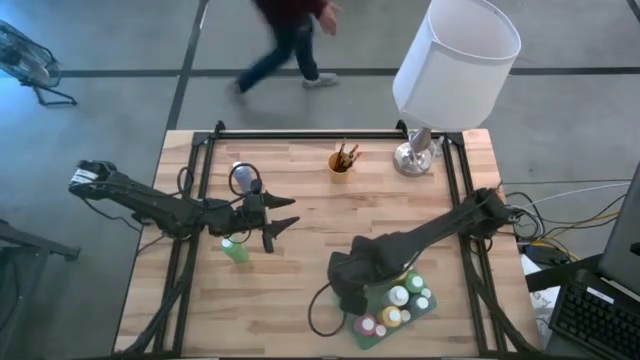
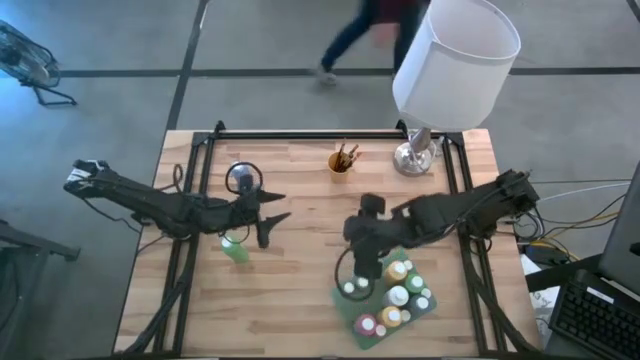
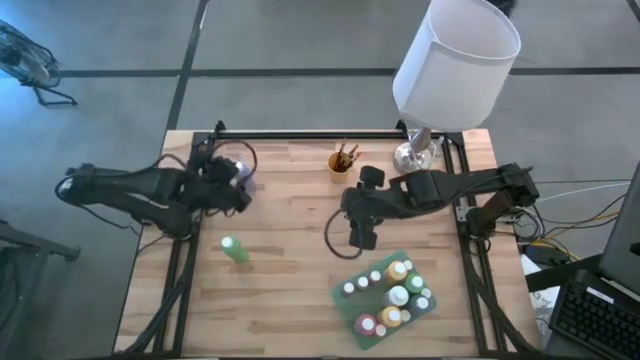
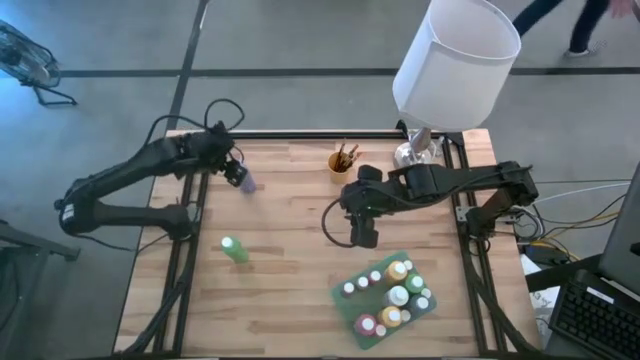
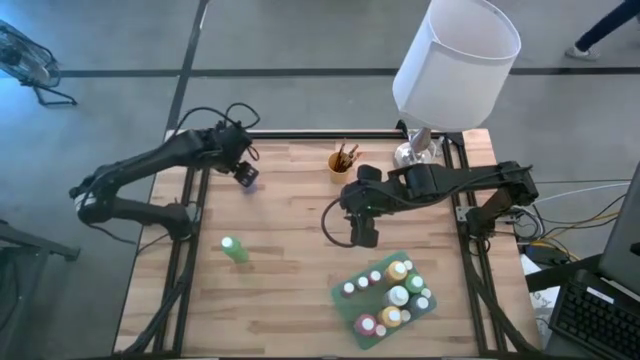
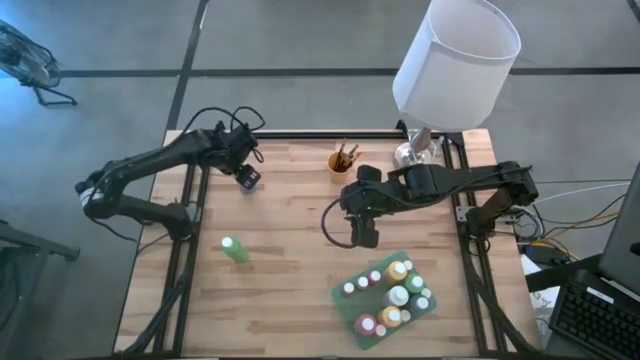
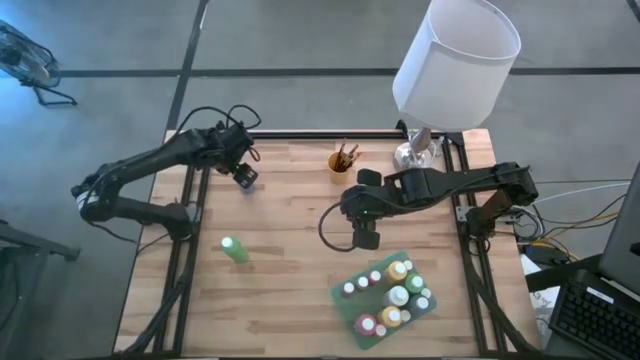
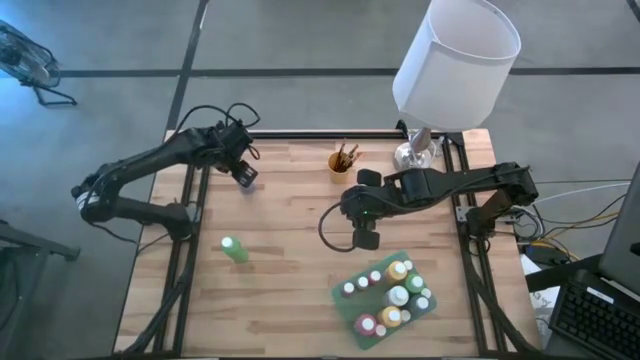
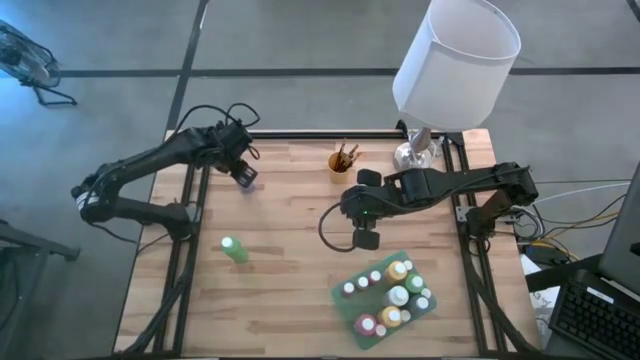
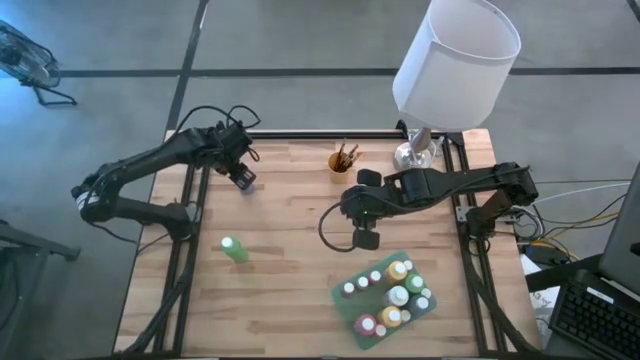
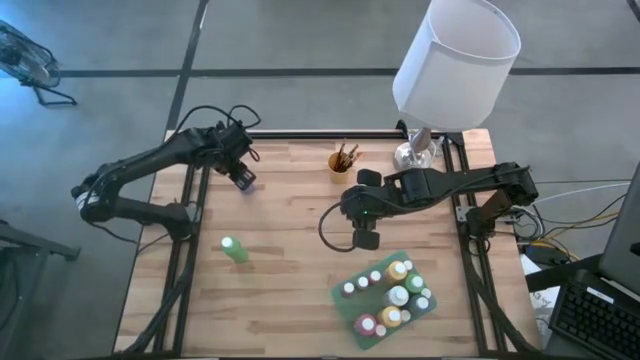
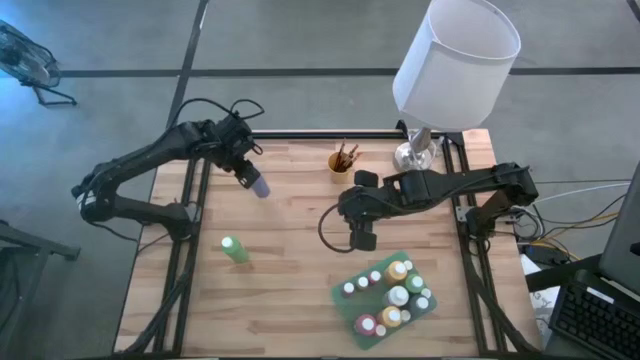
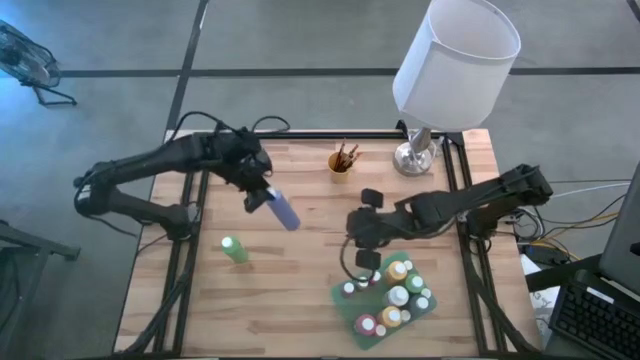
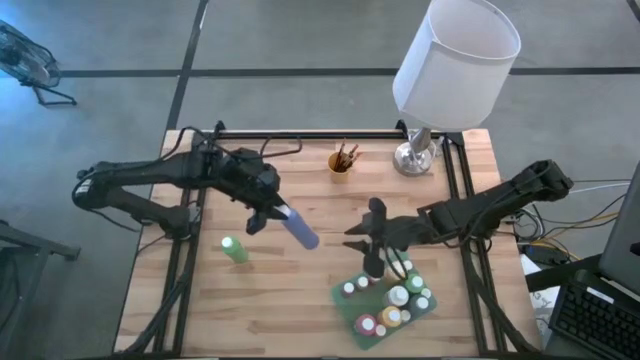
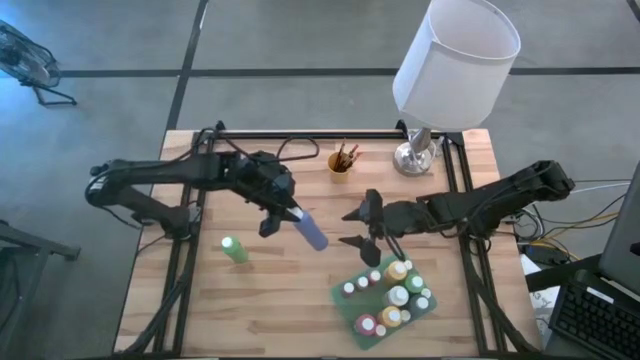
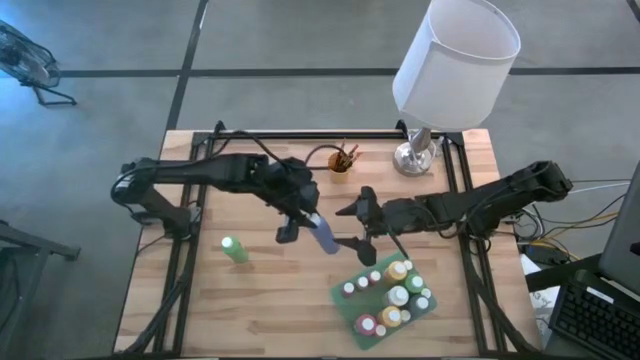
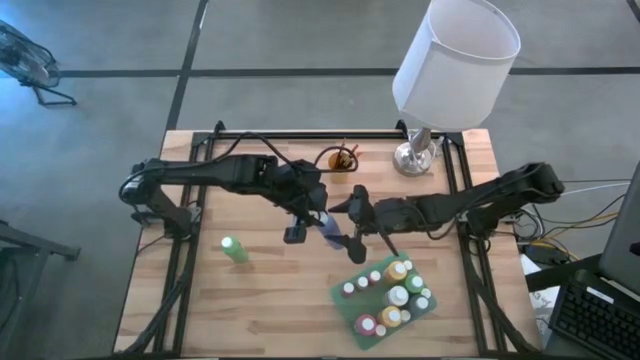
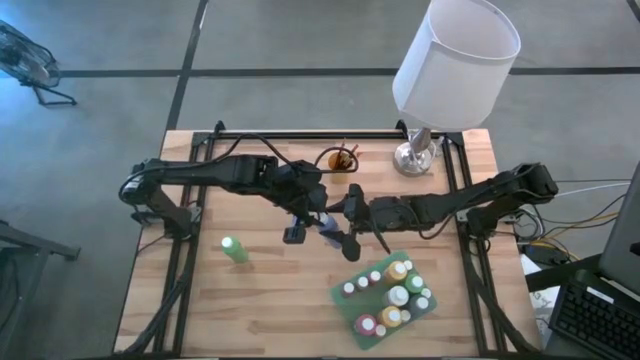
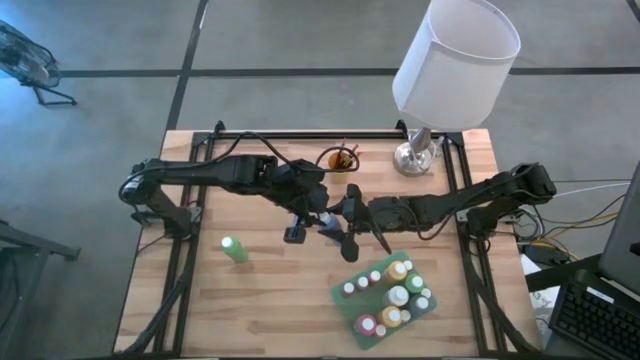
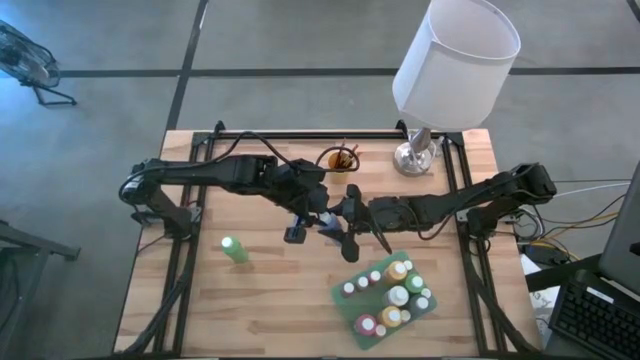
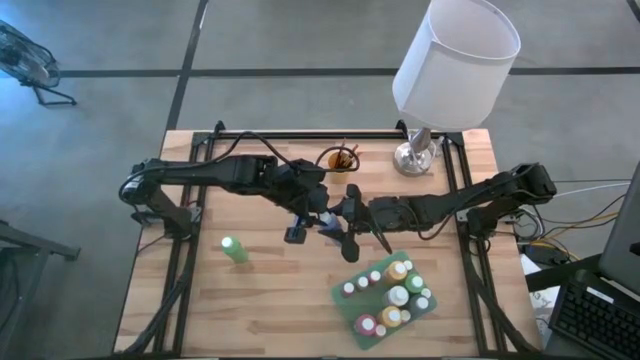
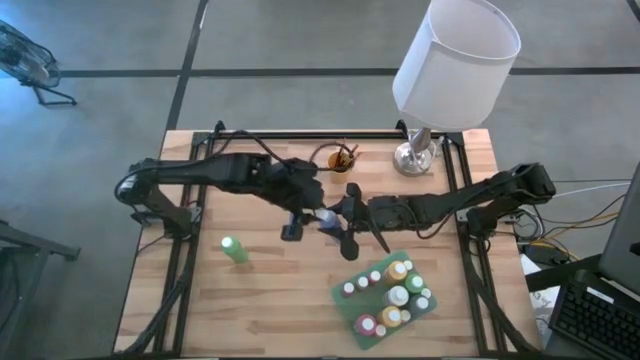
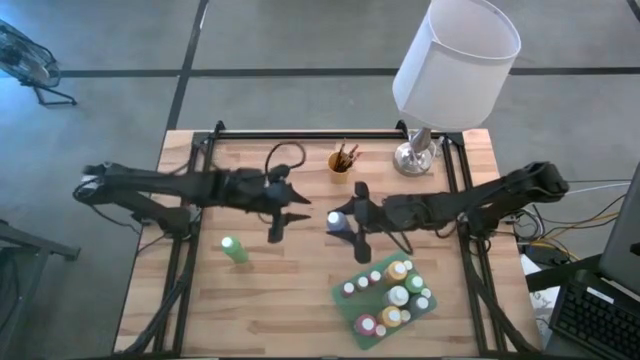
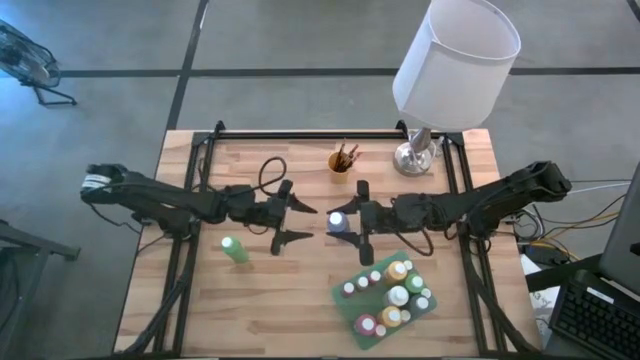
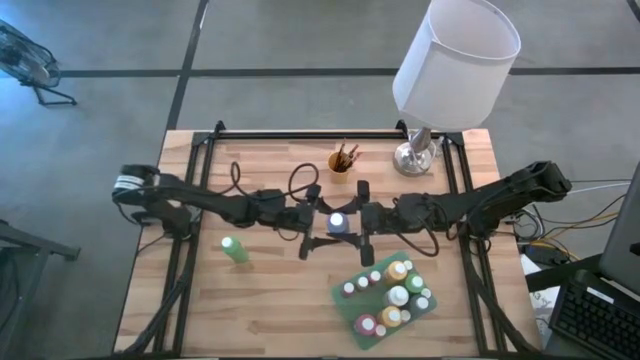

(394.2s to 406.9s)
Task: Pick & Place Paint Supplies
Put the purple paint bottle into the green bin

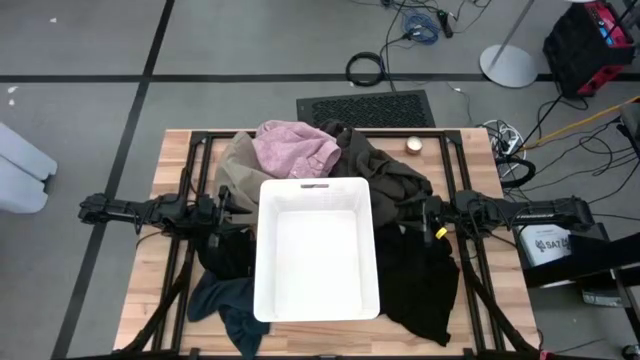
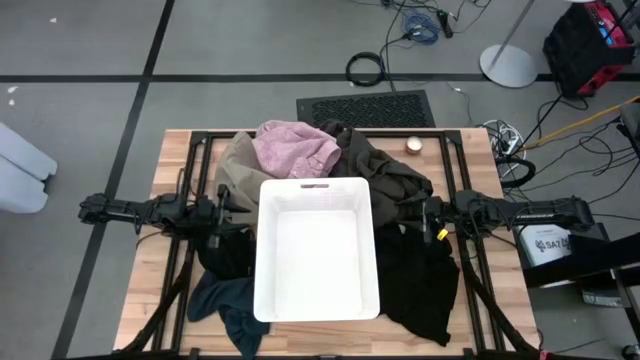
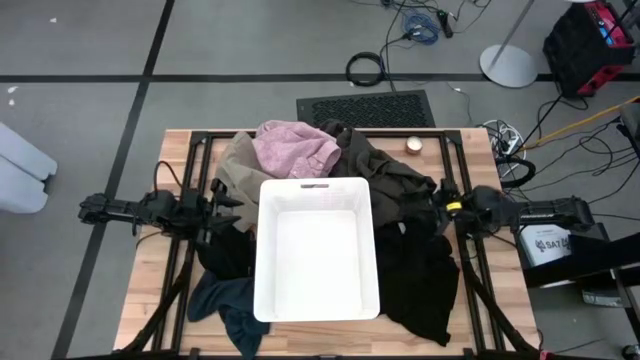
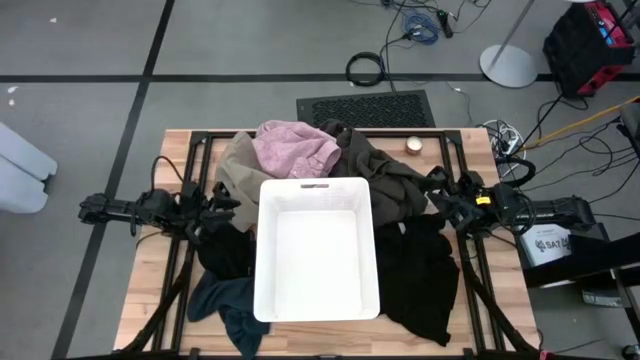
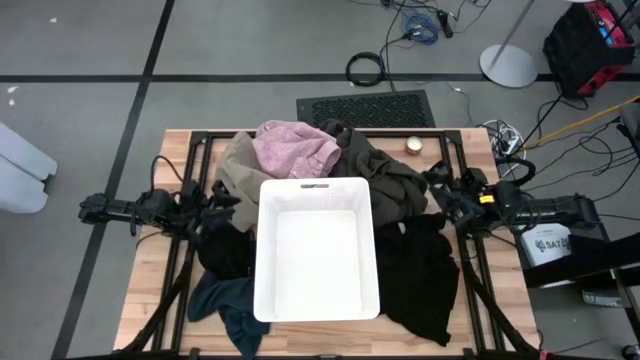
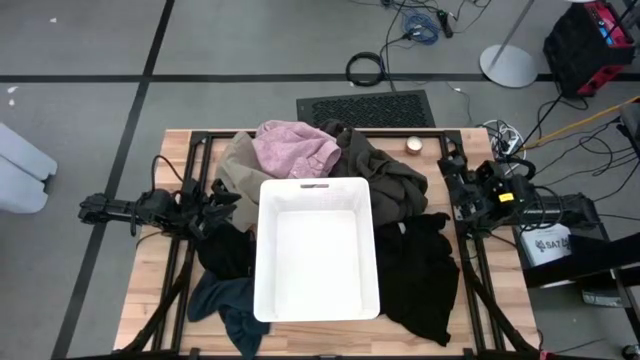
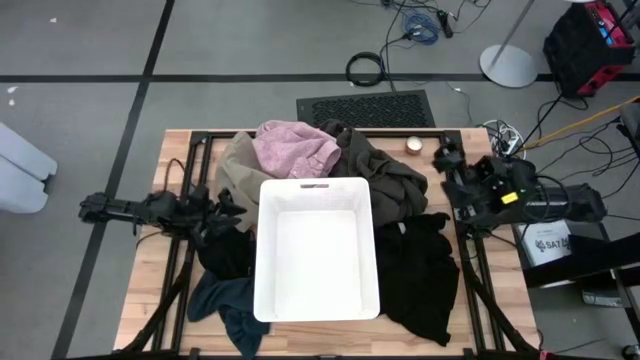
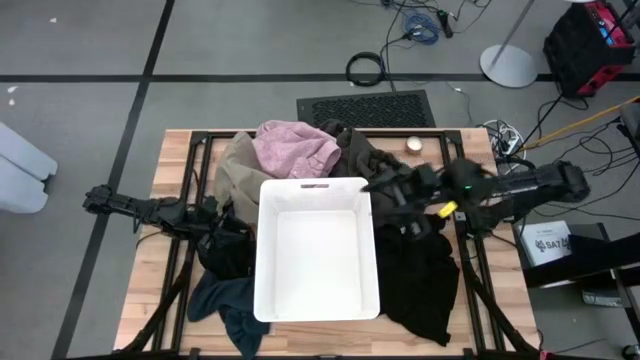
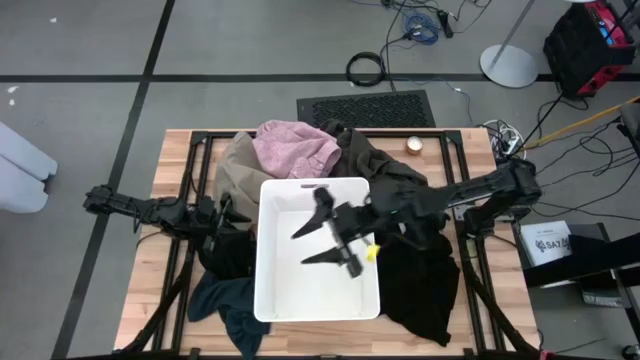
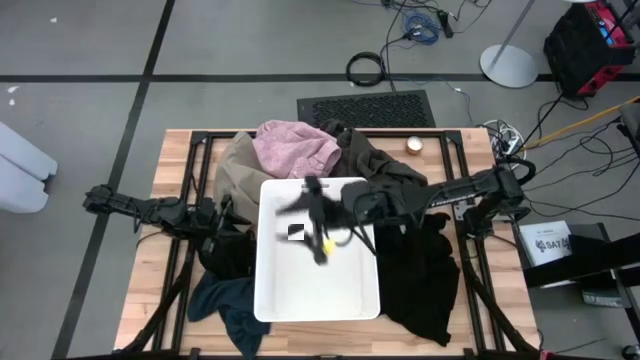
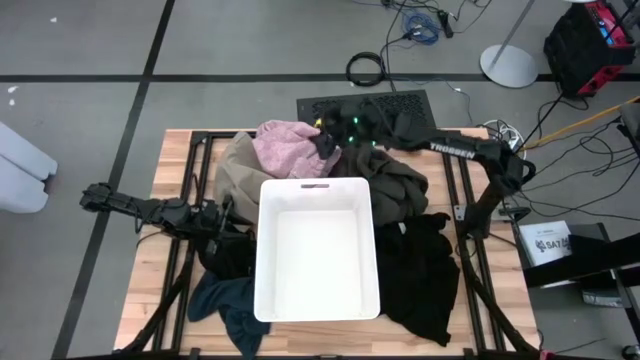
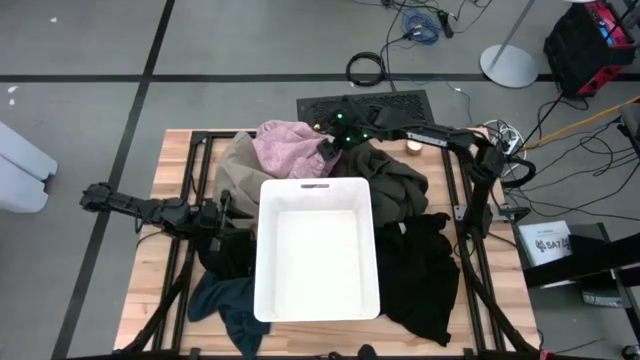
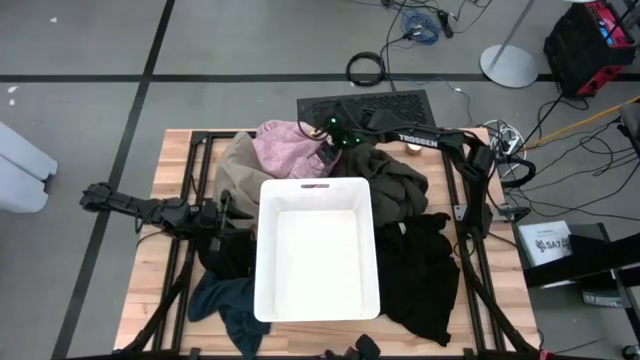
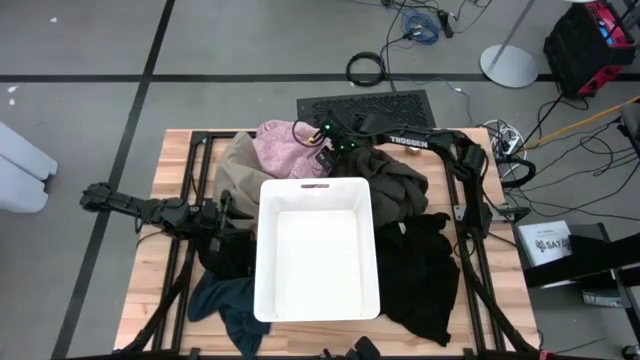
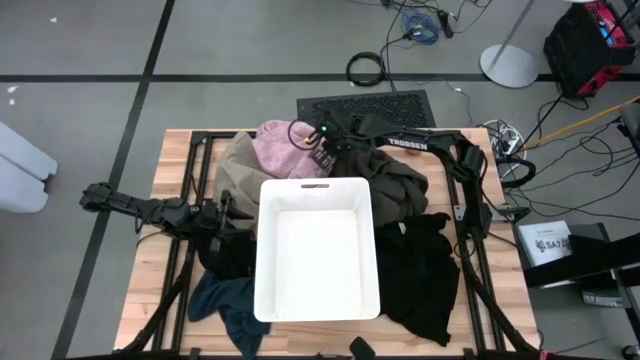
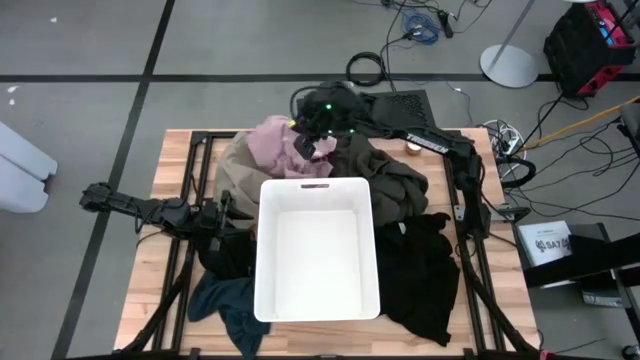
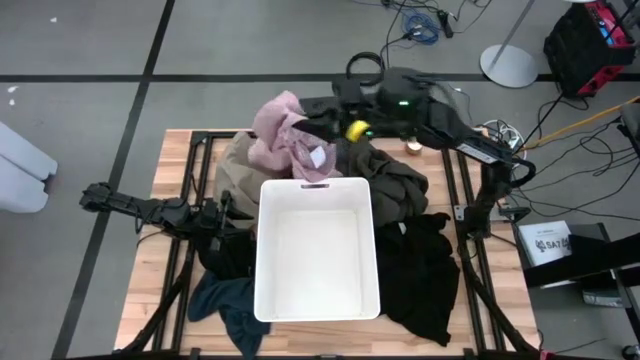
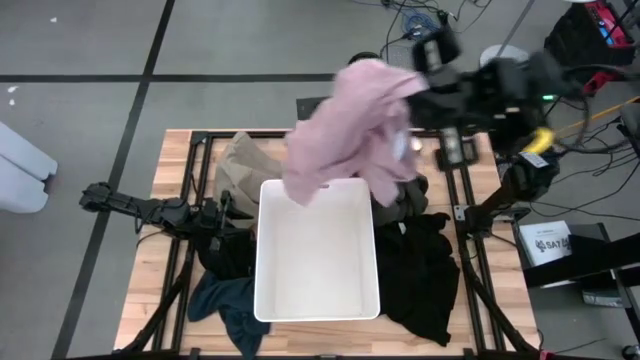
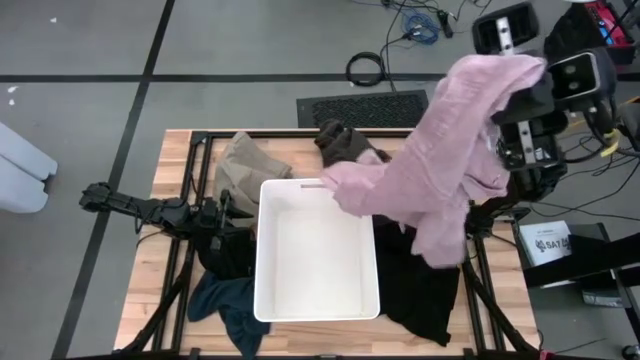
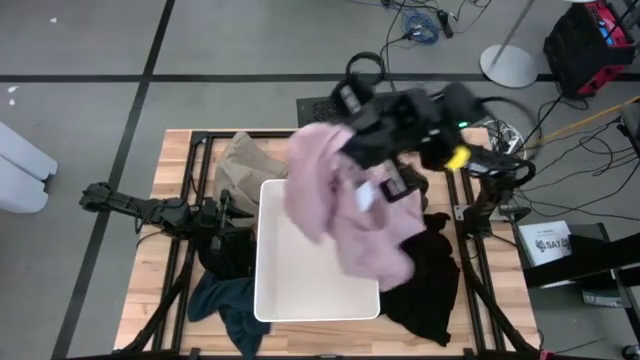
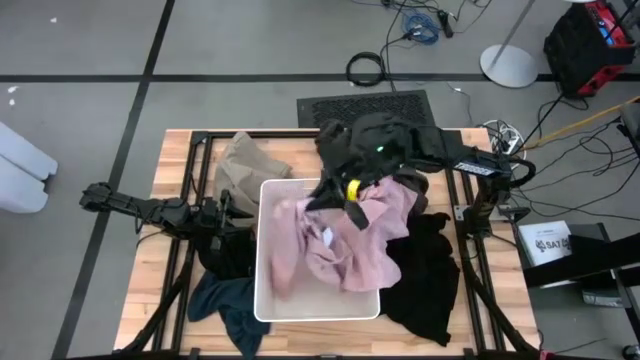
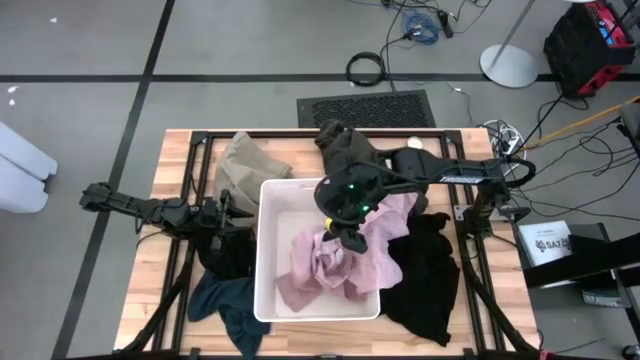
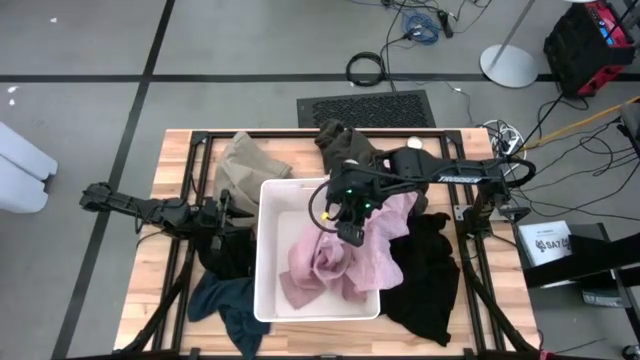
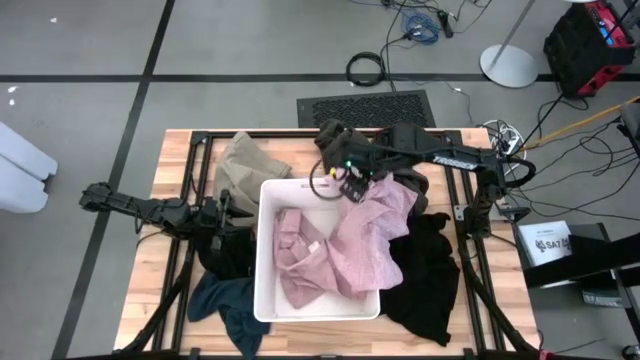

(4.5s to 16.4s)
Task: Sort clothes
Put the pink shirt into the white laundry bin
